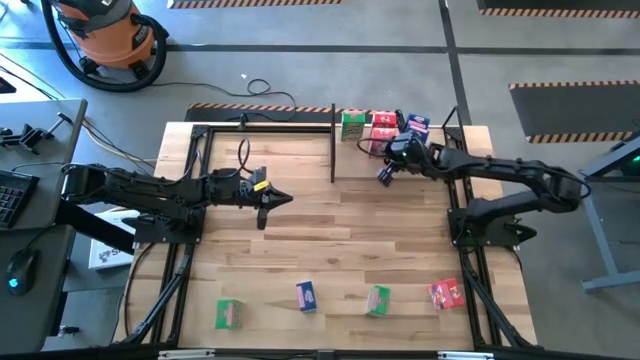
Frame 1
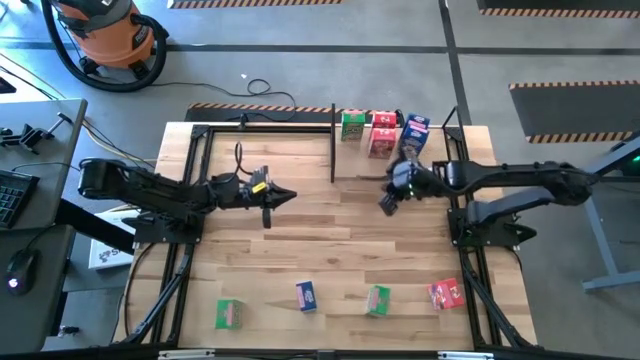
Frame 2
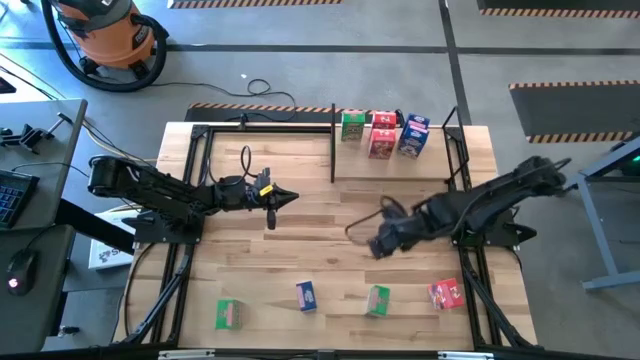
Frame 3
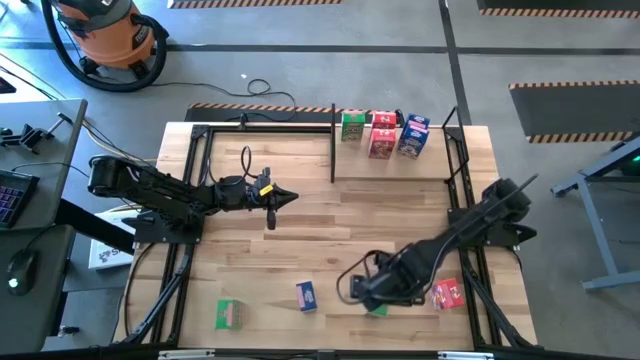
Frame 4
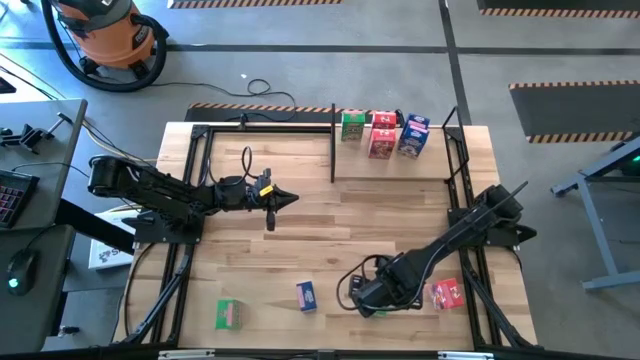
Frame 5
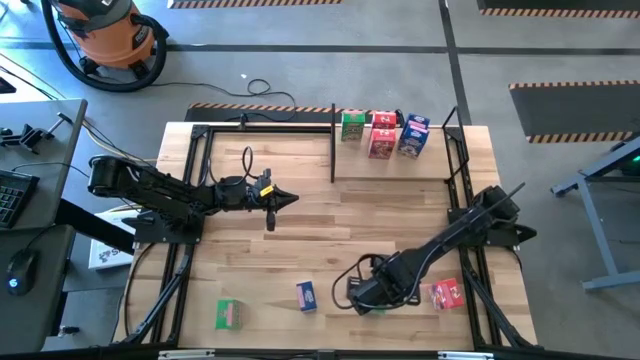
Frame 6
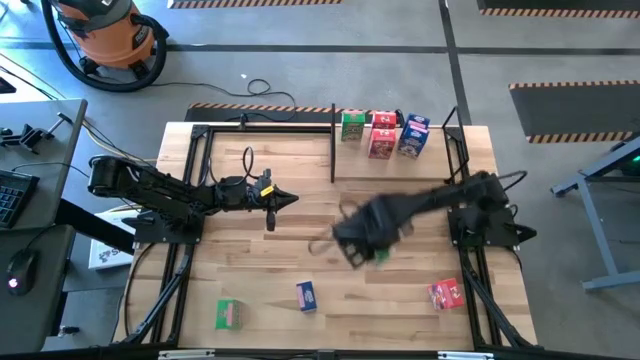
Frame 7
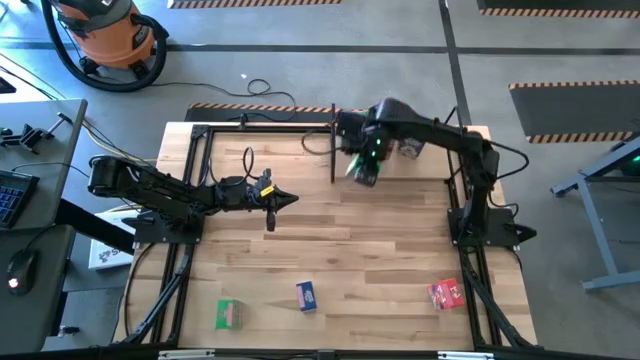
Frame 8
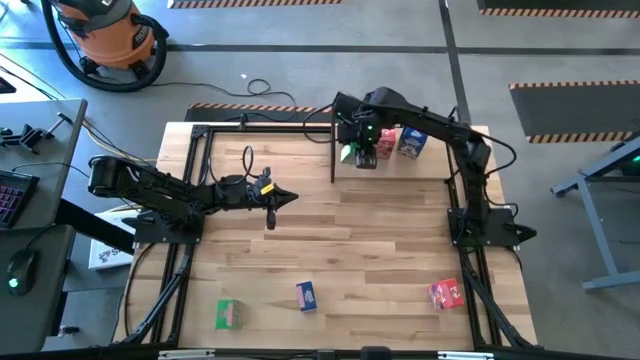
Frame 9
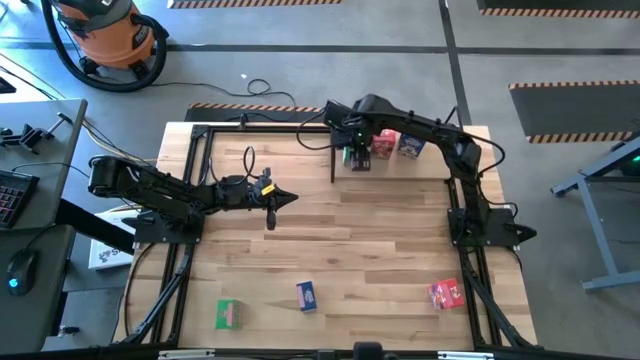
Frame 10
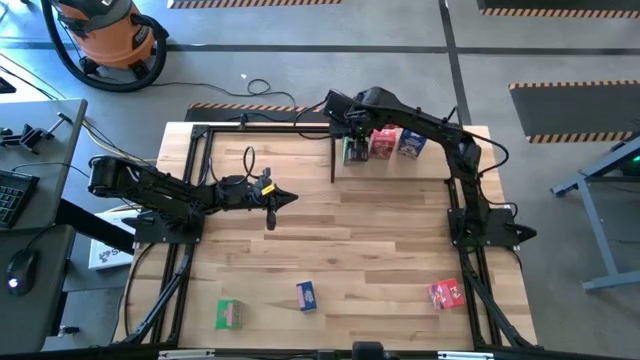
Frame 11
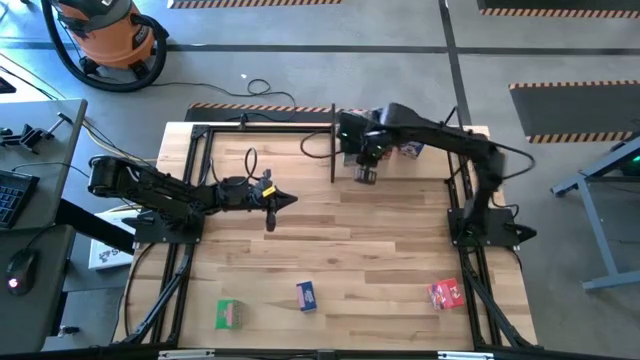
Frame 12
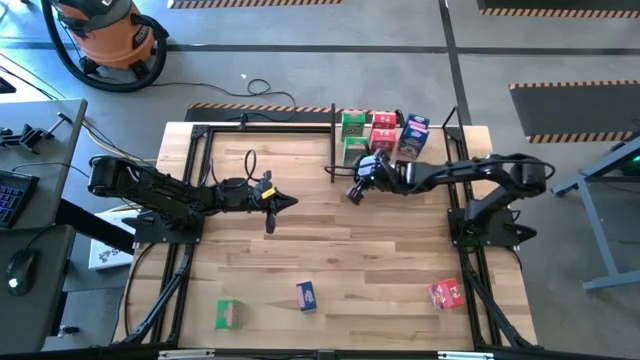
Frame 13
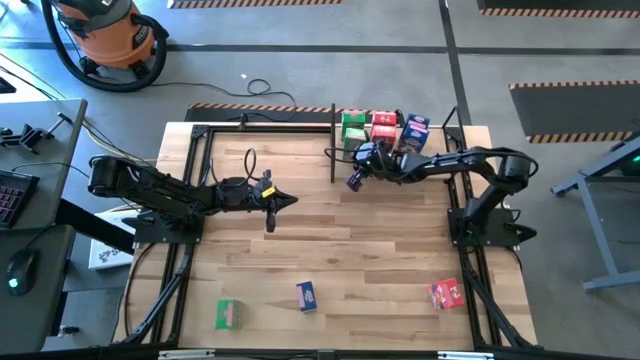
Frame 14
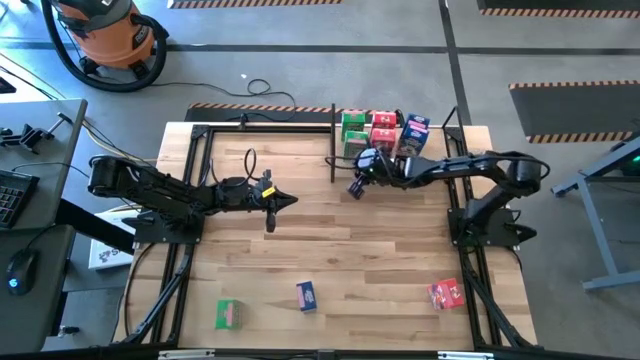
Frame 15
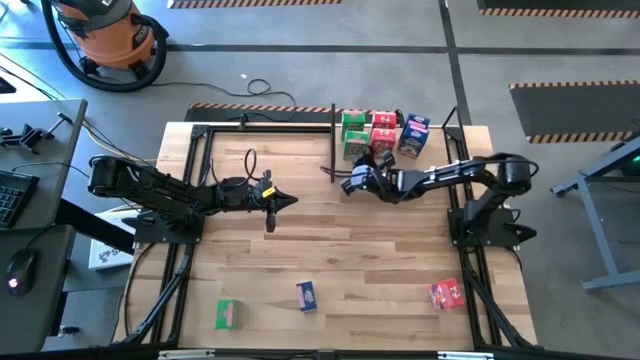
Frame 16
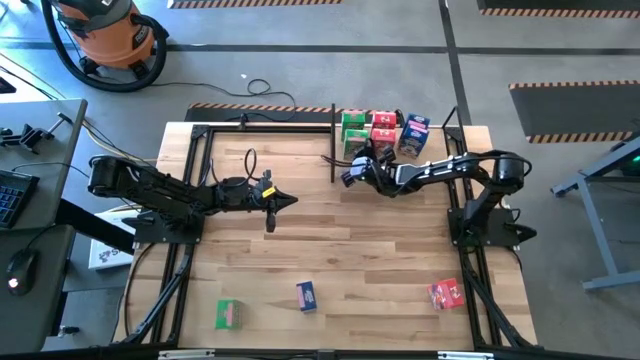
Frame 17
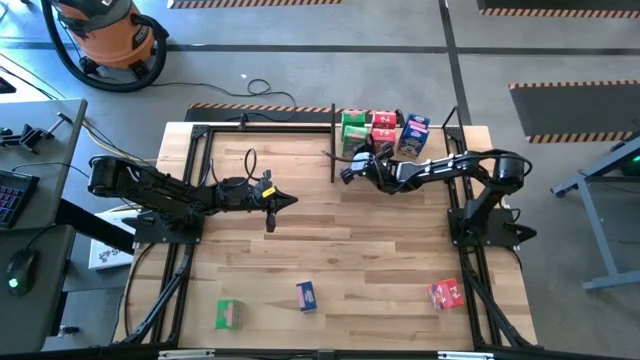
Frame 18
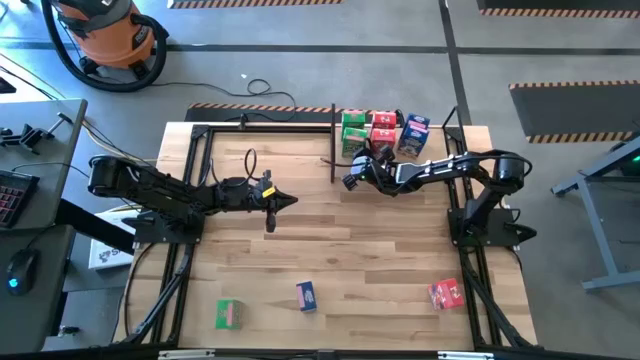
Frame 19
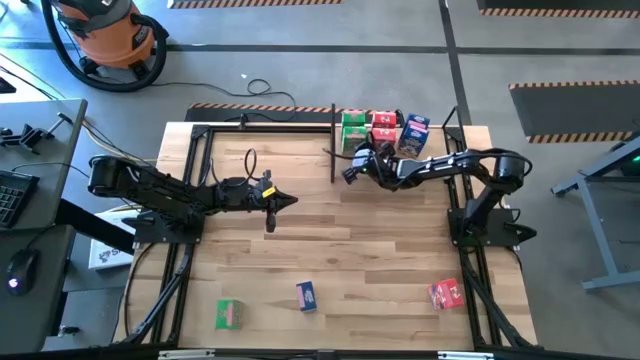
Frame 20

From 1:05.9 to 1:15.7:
Task: Stack cereal on shelf
Put the right green cereal box on the shelf

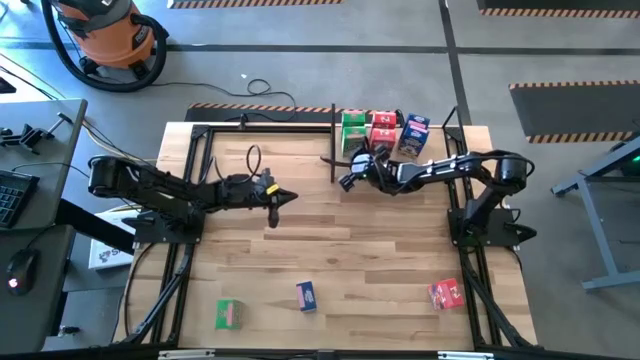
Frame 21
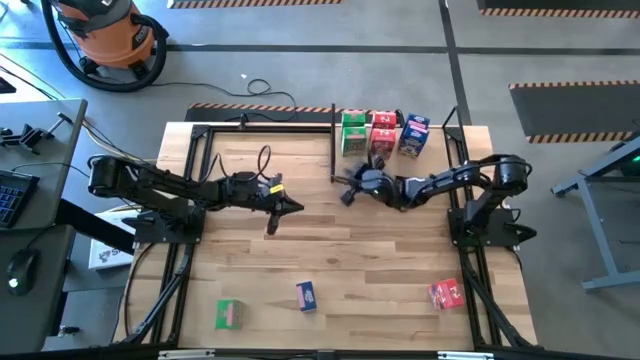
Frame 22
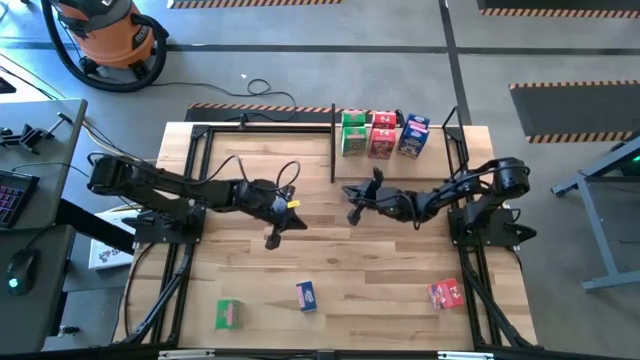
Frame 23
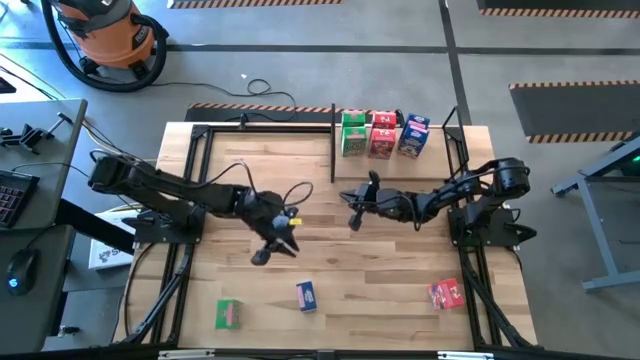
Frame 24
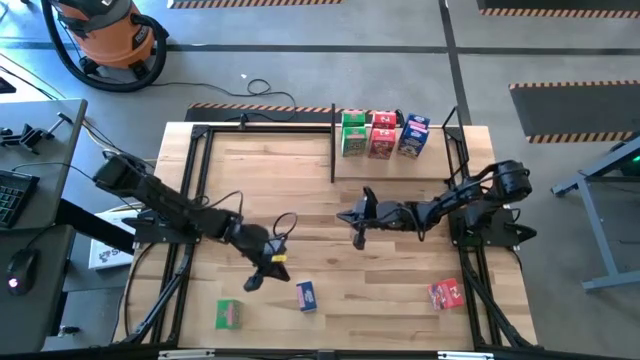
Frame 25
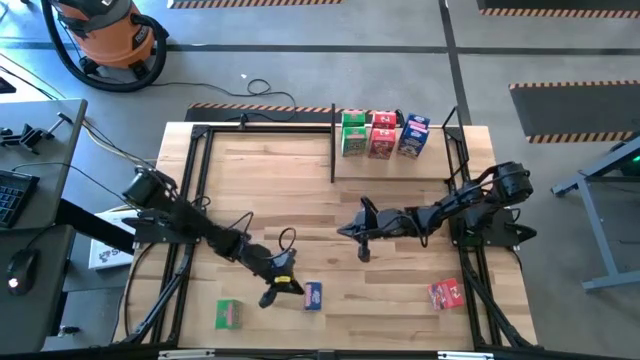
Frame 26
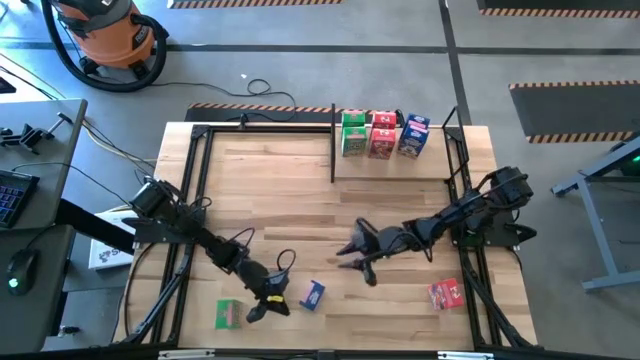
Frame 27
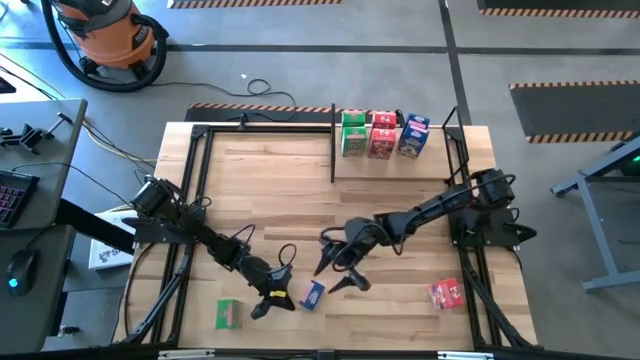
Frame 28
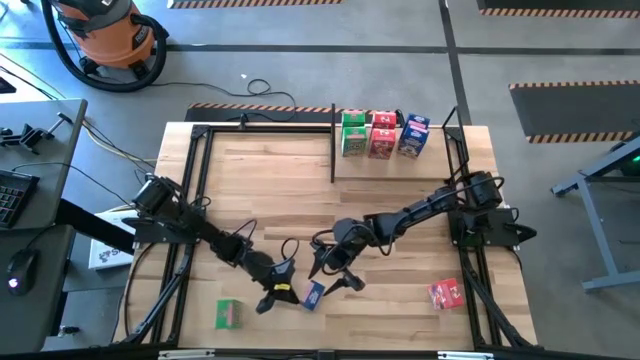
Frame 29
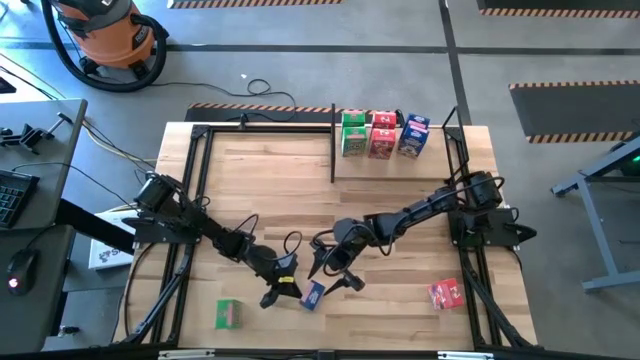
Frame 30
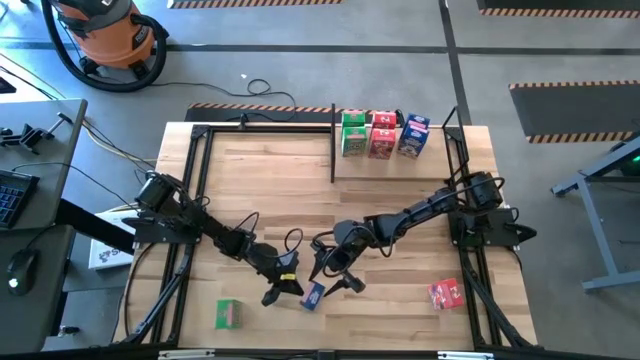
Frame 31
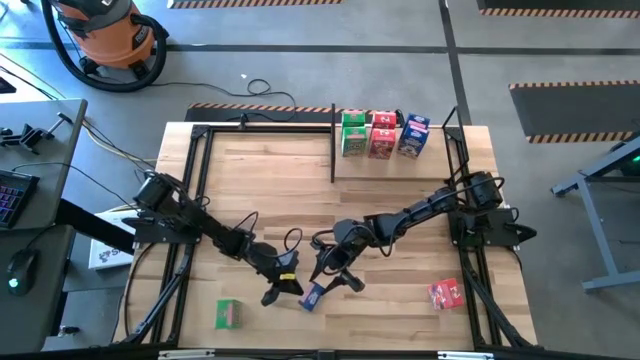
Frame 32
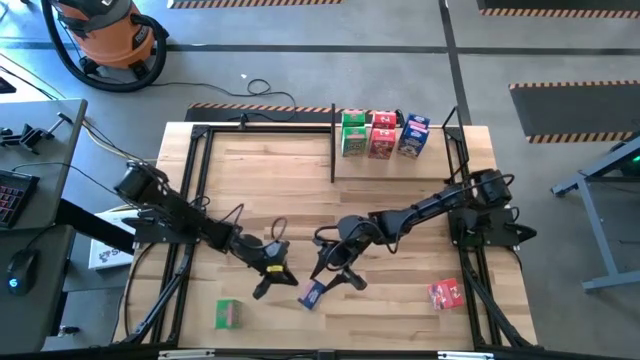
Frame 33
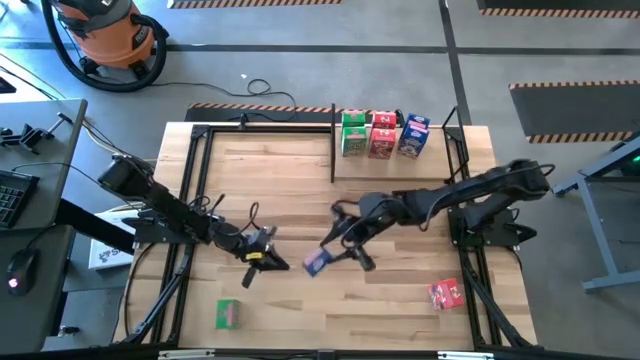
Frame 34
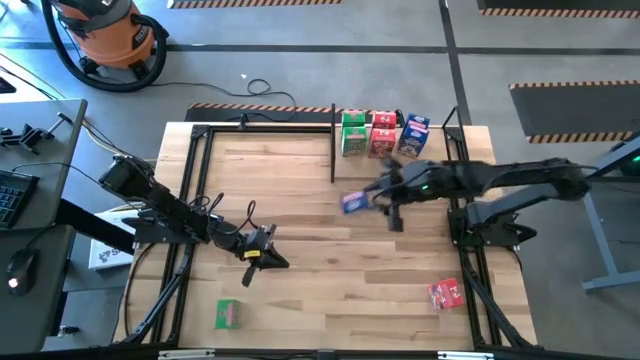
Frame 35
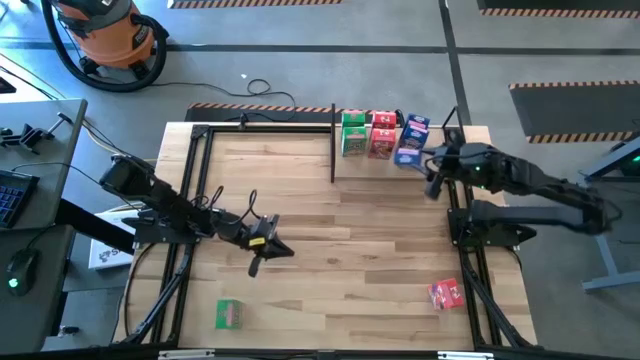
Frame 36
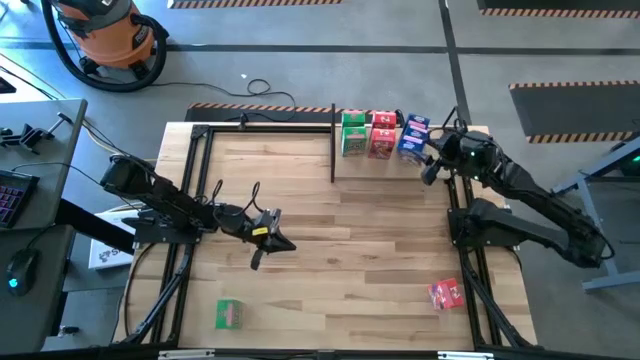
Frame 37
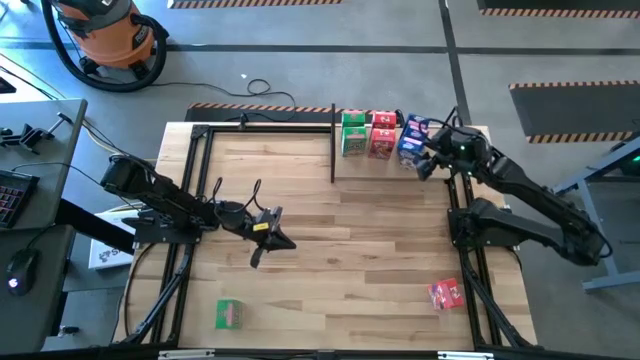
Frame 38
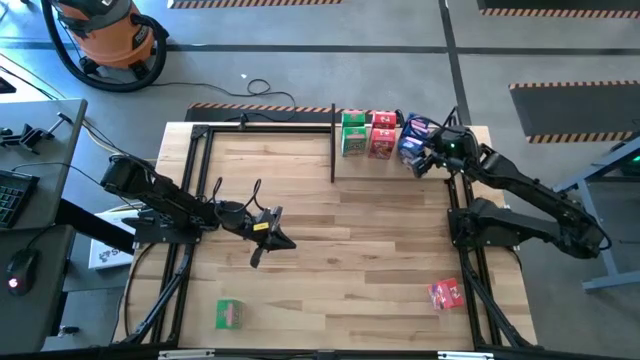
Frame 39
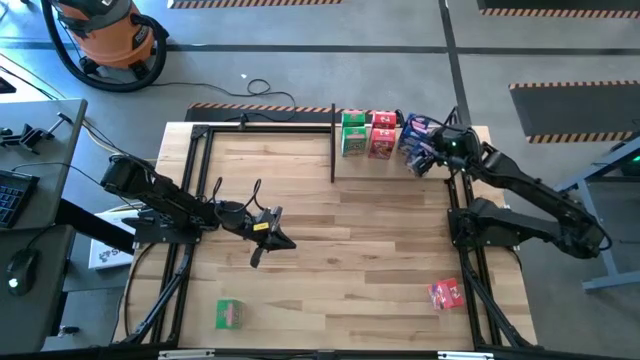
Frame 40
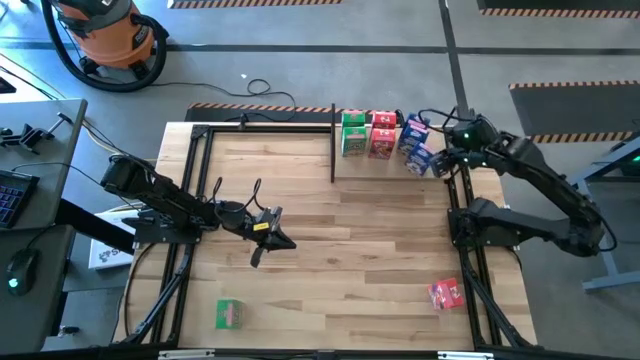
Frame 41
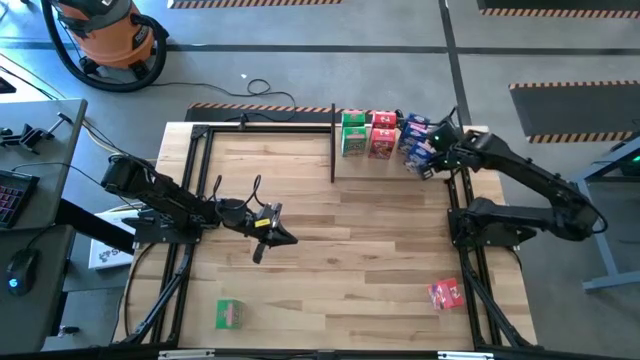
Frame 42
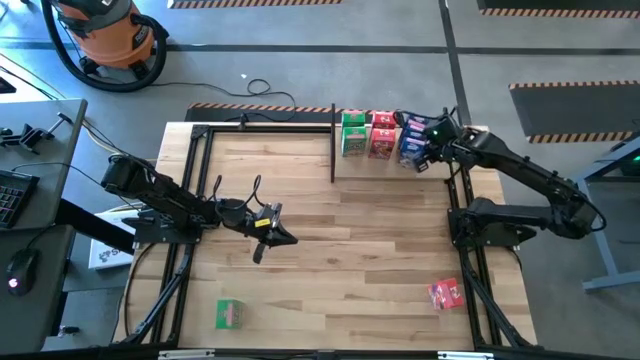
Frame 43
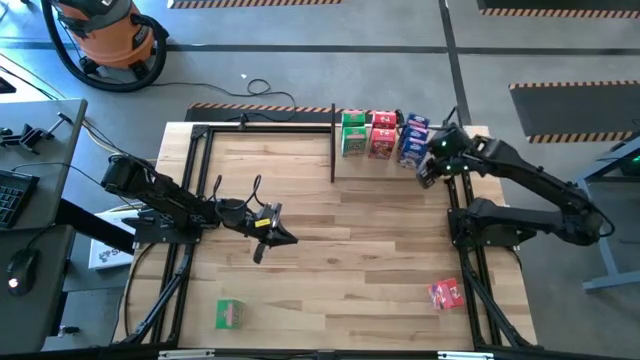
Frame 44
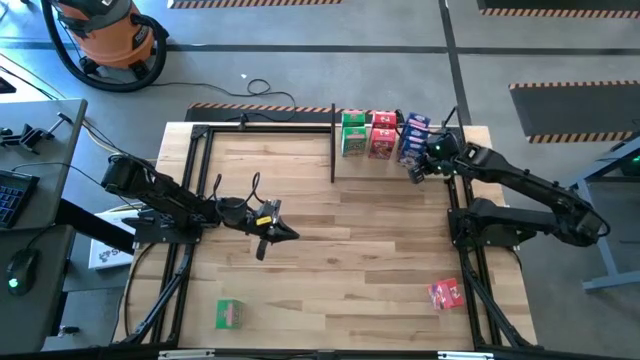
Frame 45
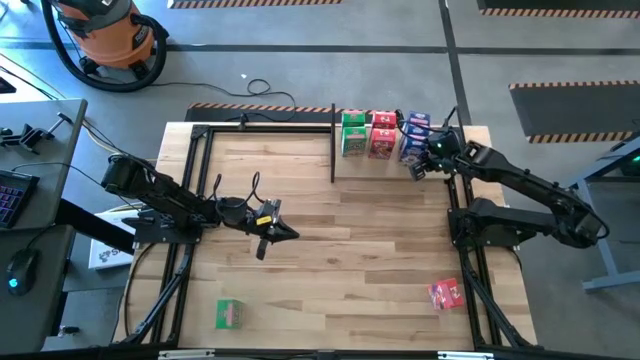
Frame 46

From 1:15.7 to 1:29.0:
Put the blue cereal box on the shelf
